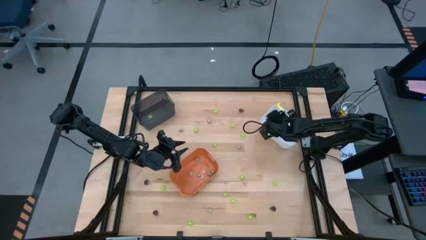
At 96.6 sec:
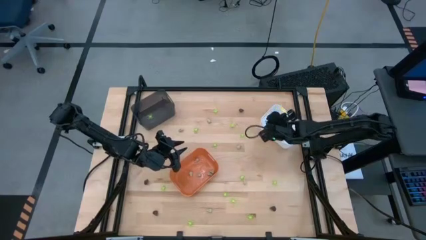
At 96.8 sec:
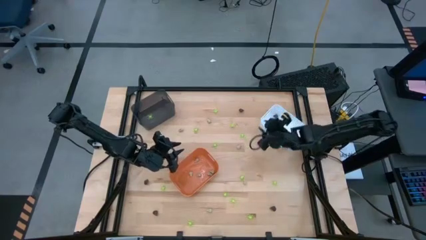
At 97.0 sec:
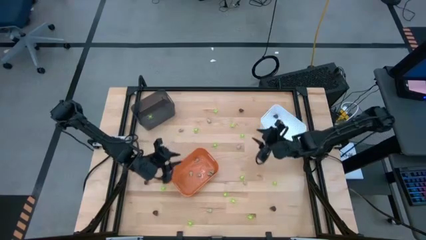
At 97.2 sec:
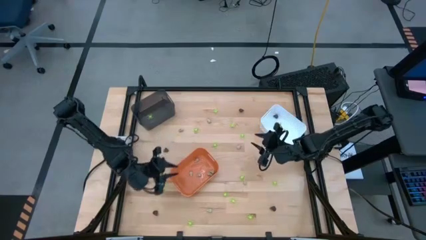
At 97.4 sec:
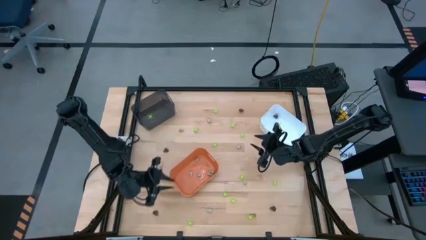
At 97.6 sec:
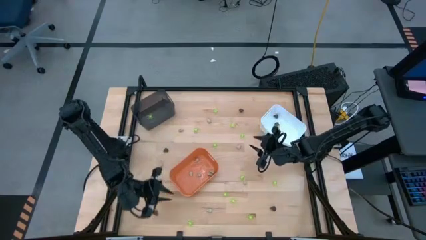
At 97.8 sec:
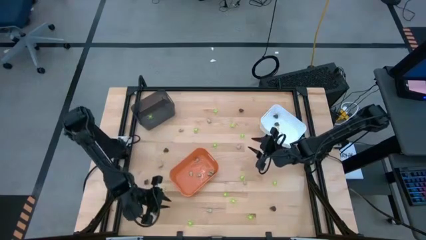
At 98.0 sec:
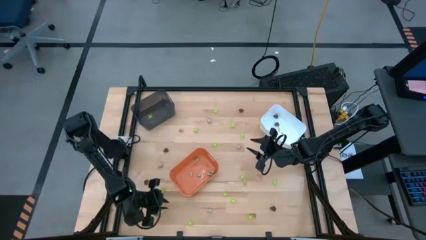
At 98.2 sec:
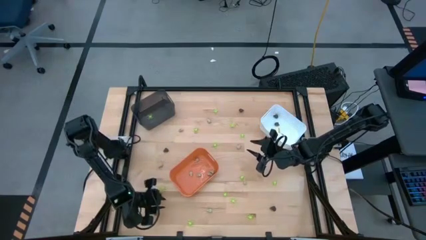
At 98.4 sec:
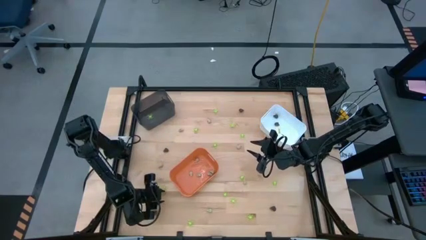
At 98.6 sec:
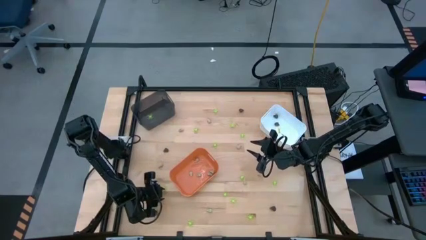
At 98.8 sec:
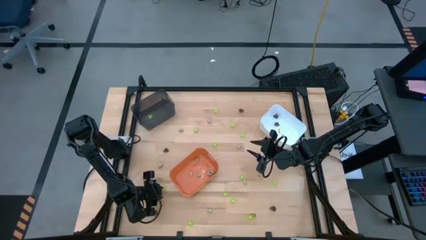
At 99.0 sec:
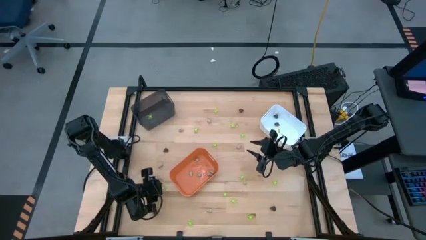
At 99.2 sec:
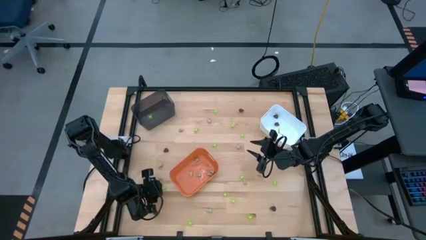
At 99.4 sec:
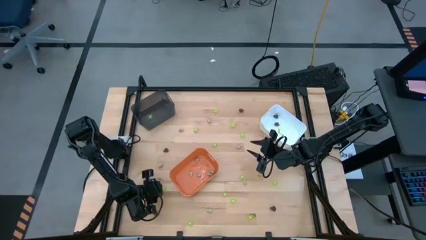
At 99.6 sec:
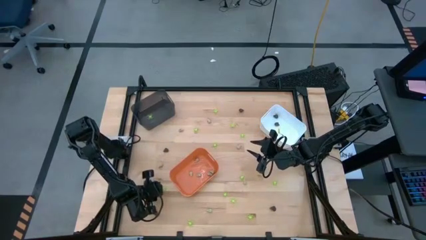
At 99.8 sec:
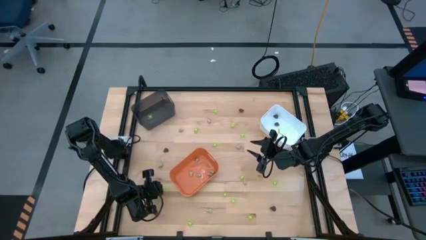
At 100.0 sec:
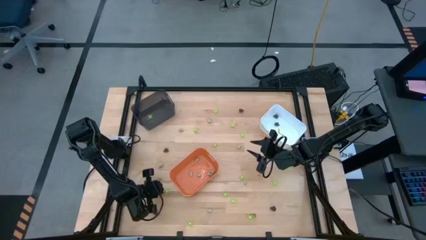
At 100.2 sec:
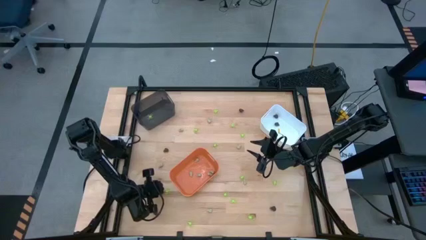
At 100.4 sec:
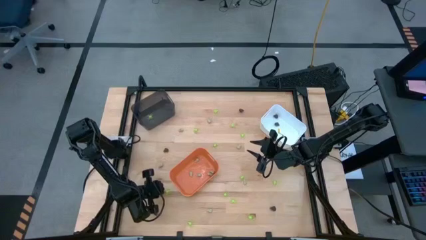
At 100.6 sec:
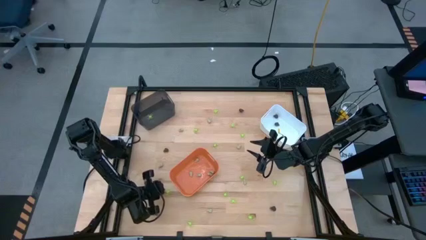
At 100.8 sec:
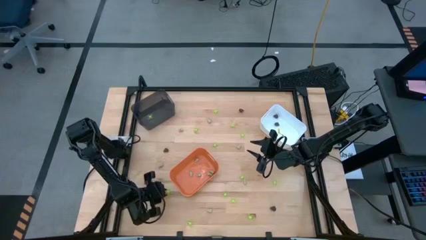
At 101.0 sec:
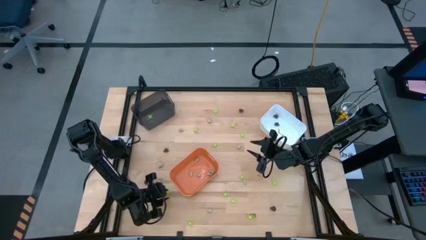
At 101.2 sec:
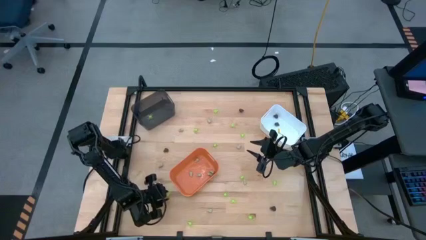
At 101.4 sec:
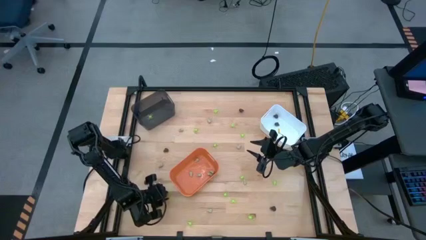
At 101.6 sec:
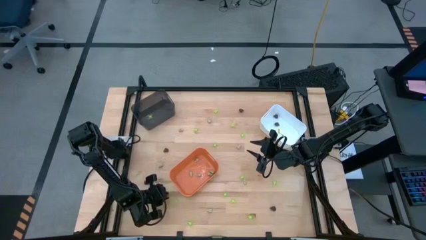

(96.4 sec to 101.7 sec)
Task: Sort Halloween decoration
Put the green spider toy into the black bin

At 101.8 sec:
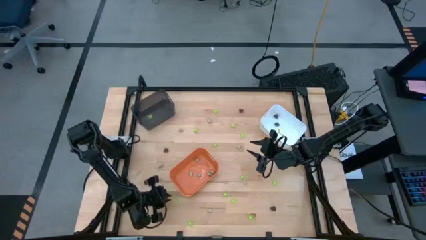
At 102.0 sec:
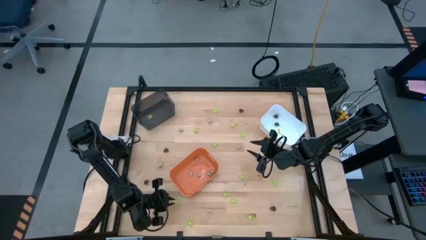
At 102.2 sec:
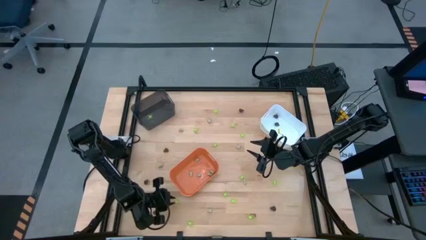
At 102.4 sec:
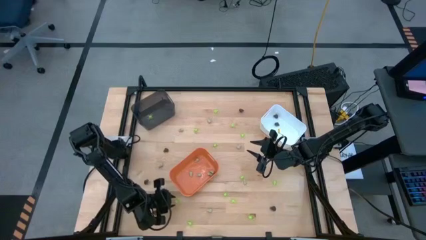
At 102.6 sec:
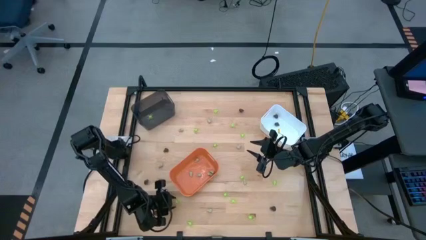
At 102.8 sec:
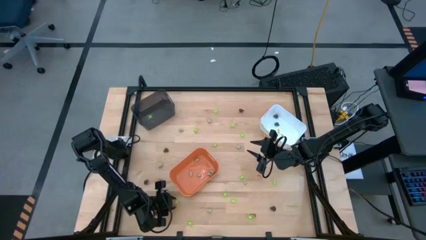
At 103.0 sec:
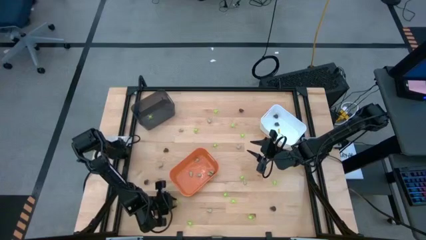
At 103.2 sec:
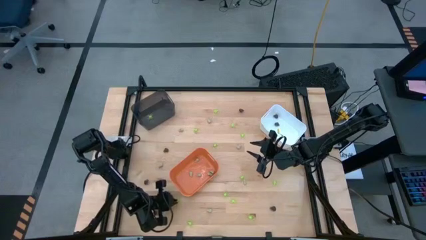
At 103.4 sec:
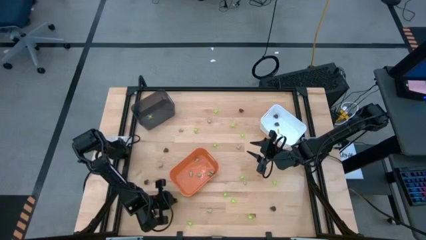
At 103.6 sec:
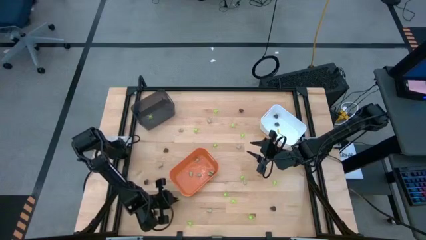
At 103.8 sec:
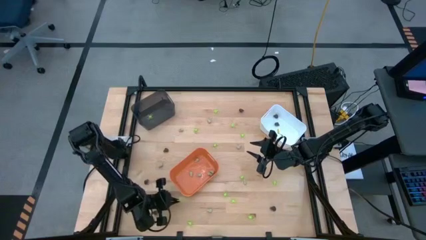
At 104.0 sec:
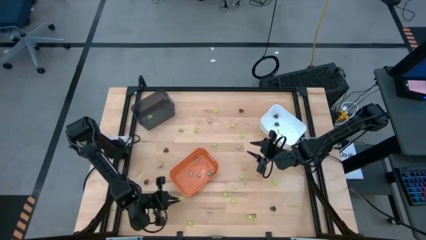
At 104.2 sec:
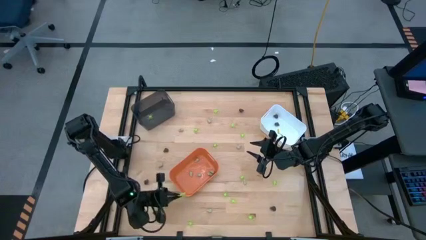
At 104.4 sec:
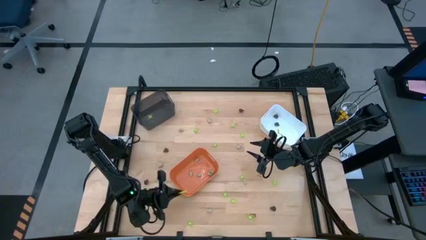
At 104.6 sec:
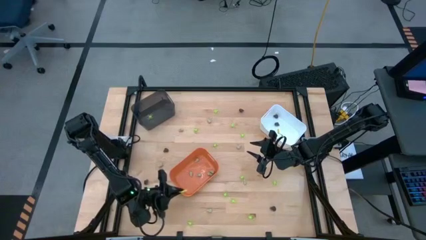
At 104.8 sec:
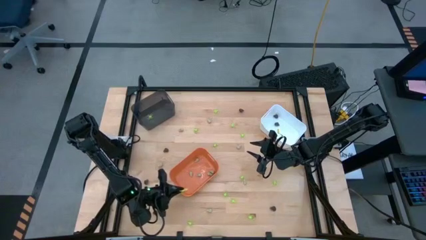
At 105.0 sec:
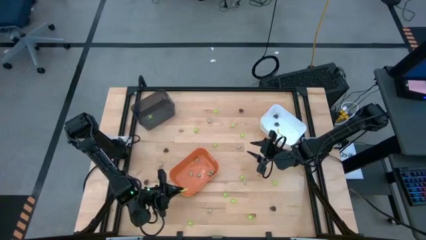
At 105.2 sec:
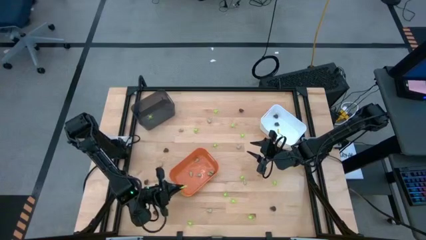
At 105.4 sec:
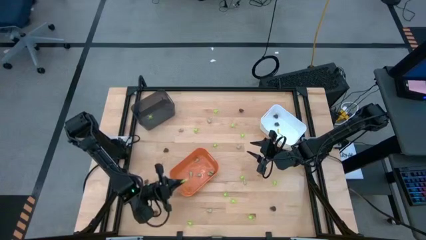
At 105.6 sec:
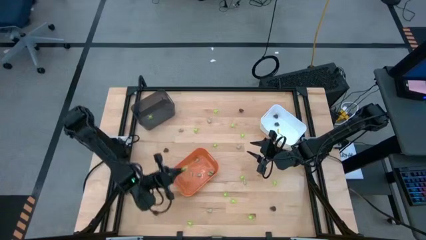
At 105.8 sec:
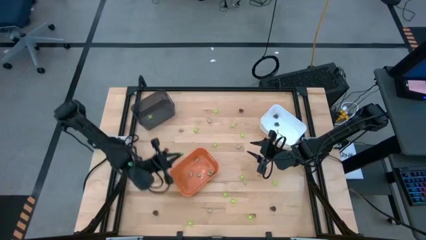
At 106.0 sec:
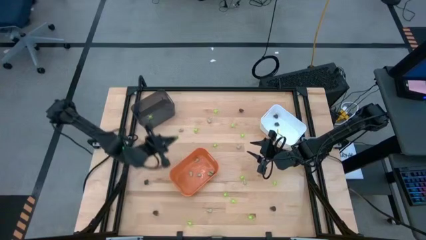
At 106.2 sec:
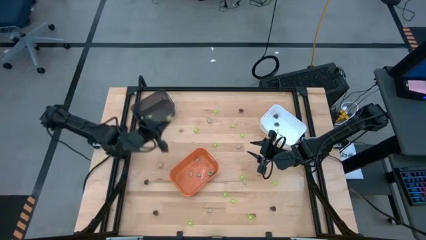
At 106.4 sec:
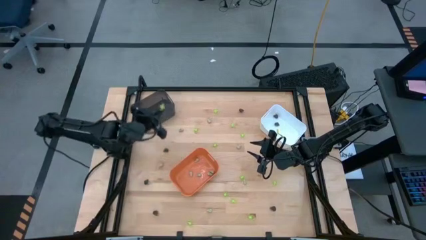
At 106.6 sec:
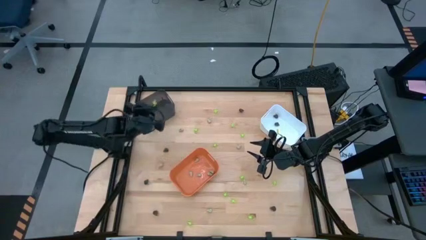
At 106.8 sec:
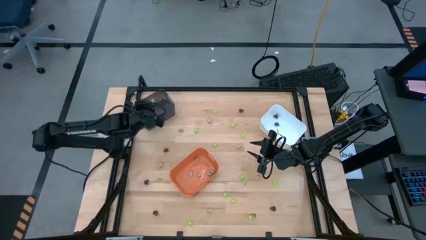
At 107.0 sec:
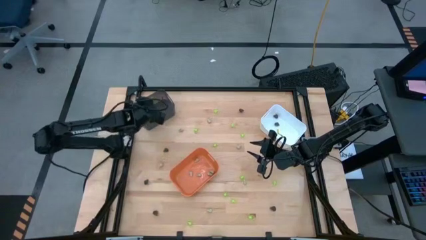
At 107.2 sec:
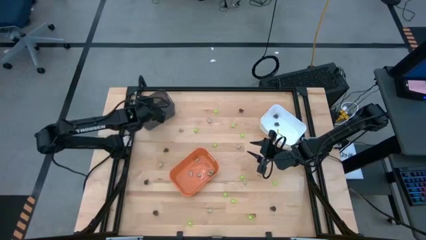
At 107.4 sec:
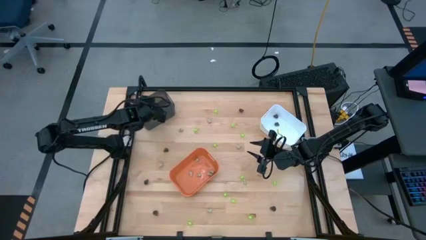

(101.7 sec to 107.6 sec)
Put the green spider toy into the black bin

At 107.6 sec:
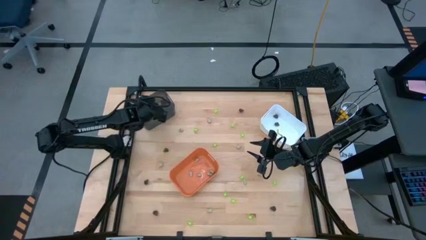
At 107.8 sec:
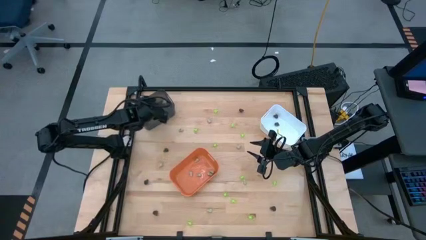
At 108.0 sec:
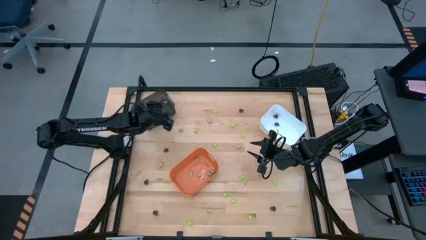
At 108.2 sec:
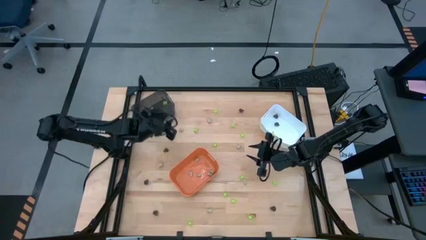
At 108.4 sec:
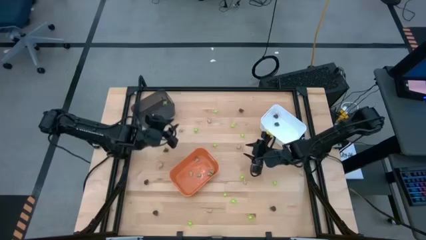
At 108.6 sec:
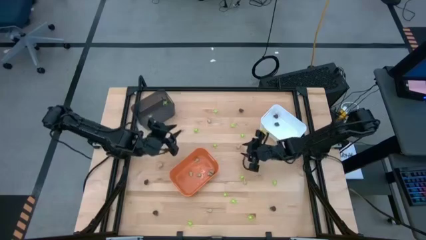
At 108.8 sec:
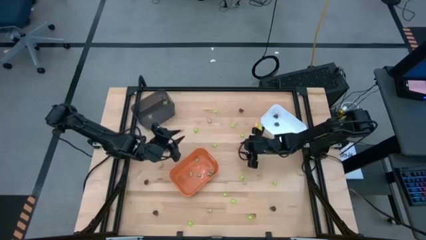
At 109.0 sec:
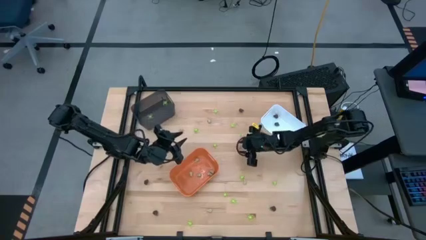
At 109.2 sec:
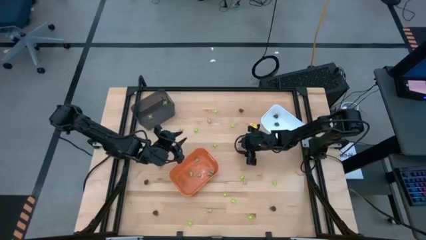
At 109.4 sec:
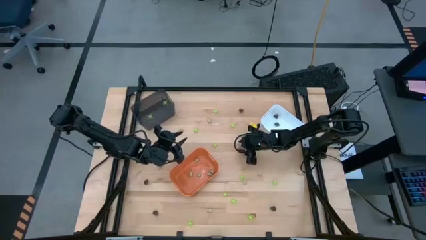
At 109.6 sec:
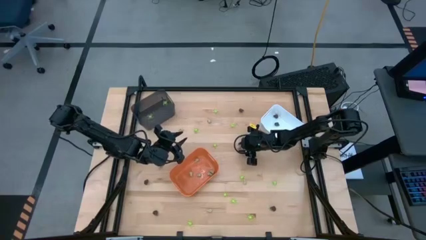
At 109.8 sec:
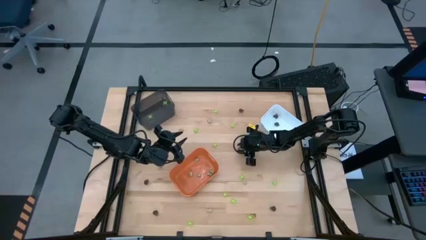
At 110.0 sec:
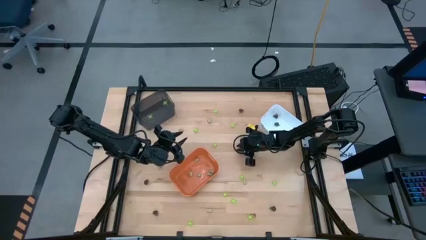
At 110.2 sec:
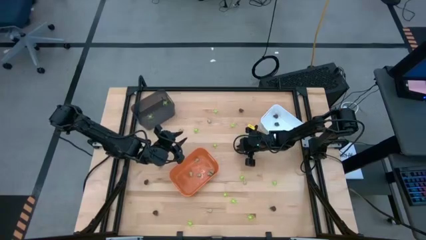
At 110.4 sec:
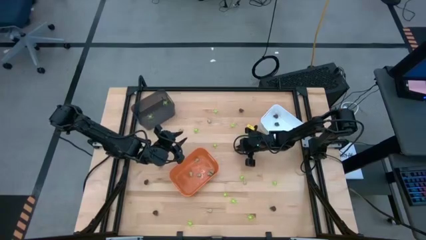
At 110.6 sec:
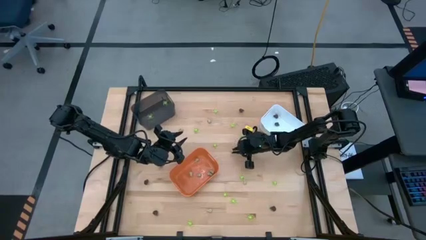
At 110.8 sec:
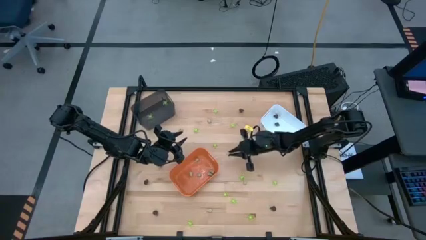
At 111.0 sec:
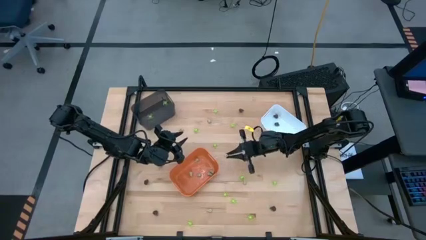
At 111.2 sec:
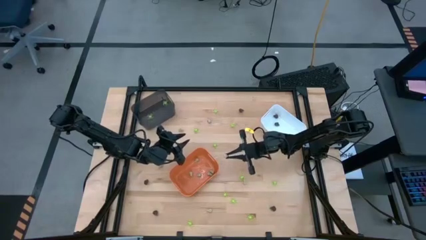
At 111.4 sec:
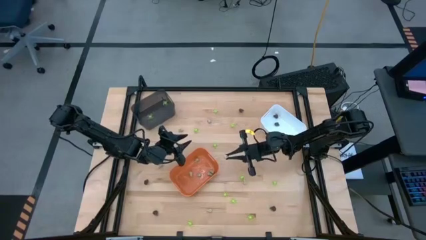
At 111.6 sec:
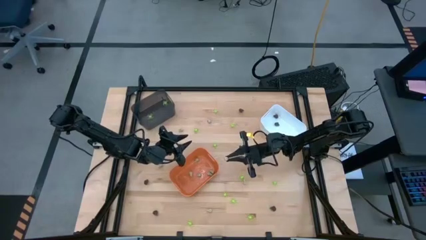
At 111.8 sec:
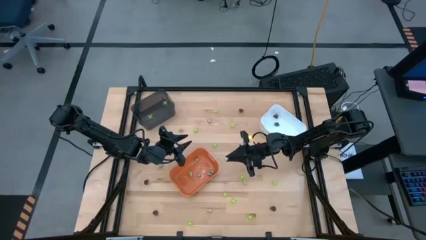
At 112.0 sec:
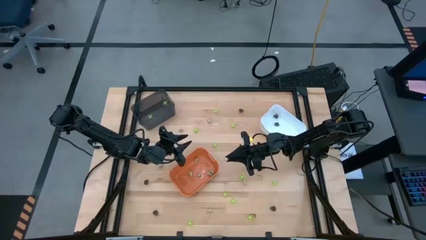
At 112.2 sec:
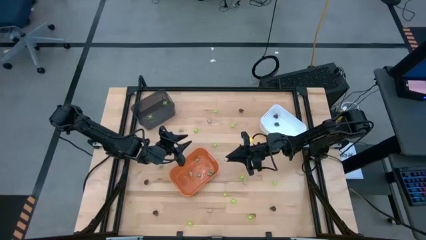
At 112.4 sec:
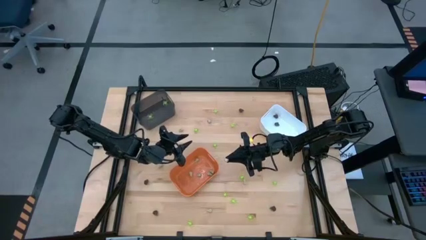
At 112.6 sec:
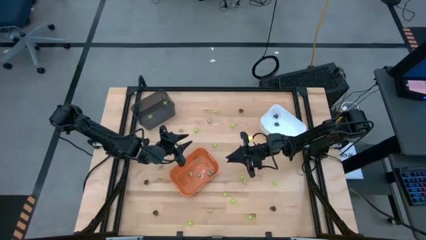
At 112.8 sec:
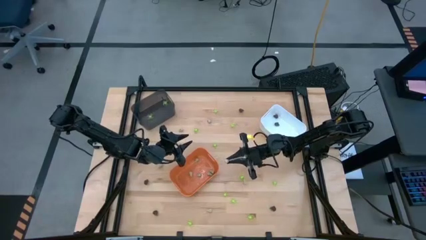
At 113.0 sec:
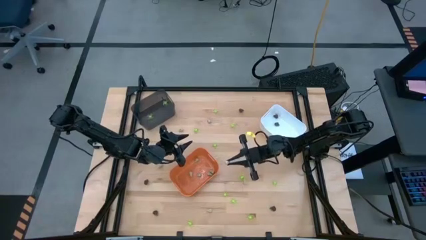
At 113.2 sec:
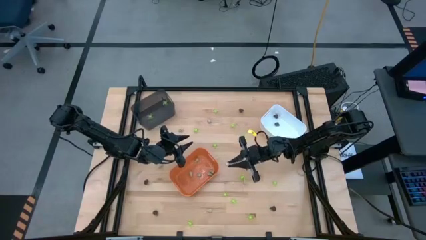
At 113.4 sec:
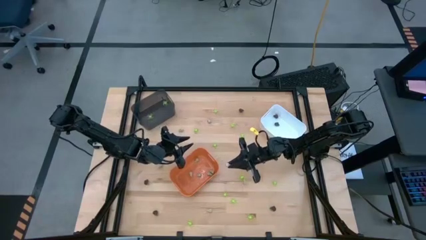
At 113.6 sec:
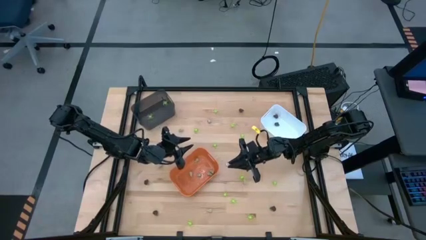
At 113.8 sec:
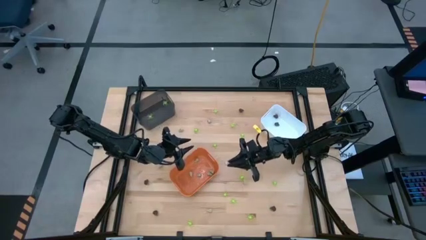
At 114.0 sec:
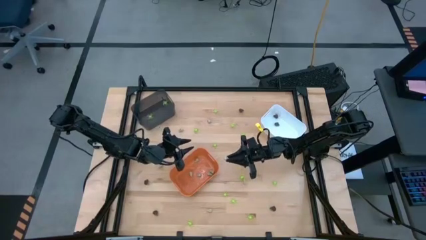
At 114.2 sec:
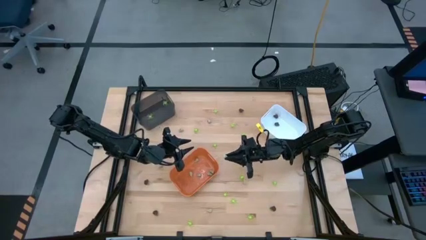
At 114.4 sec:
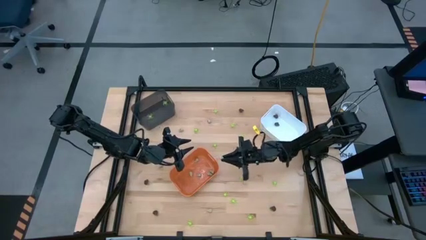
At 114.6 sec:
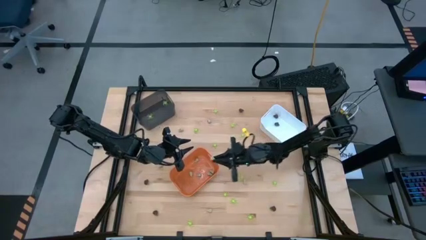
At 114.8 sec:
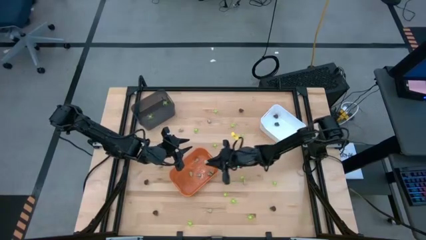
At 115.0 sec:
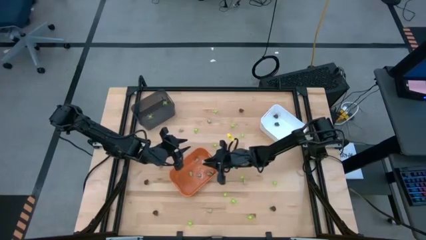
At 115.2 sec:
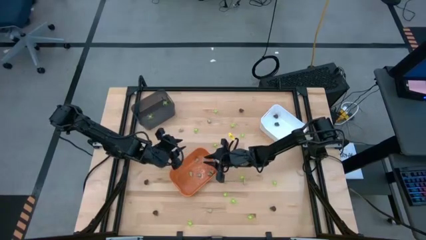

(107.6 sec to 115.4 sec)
Put the small white skull toy into the orange bin
